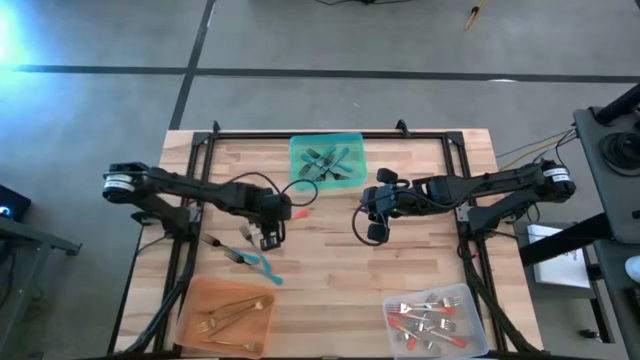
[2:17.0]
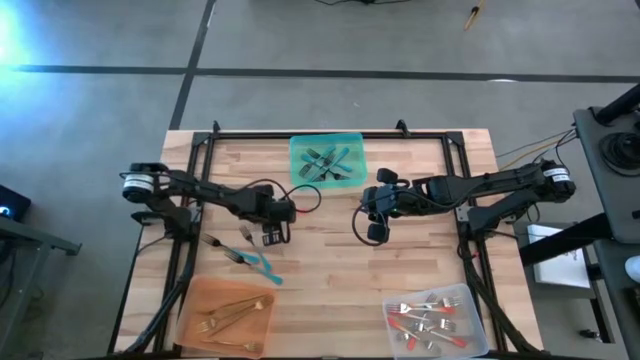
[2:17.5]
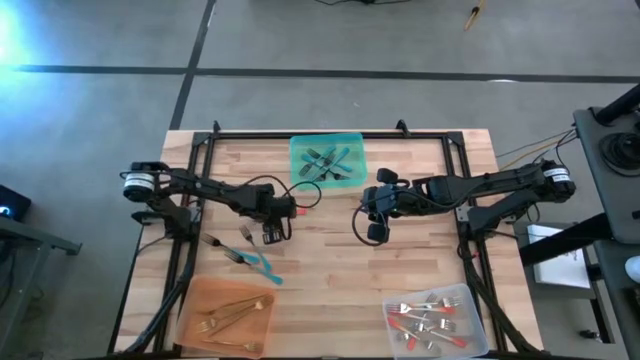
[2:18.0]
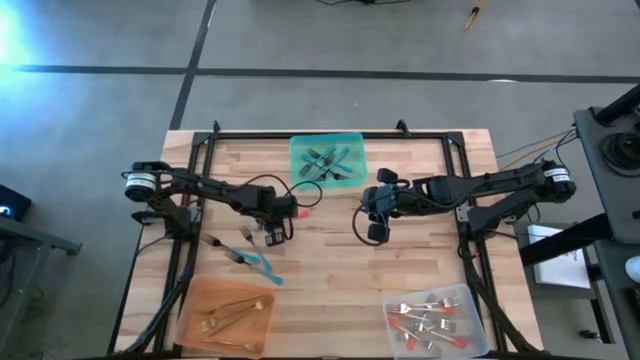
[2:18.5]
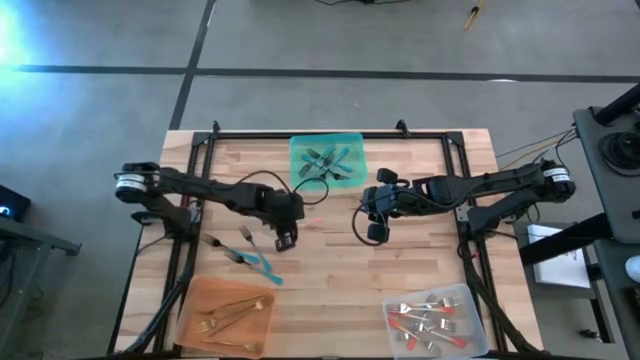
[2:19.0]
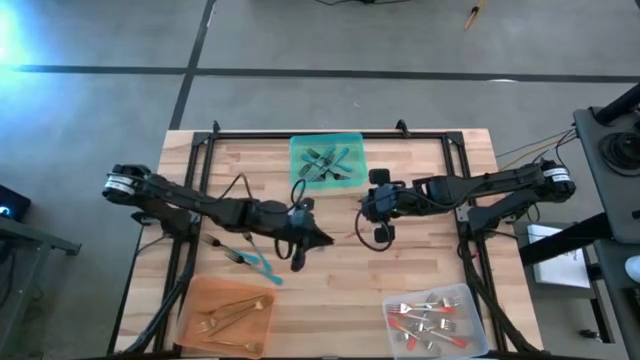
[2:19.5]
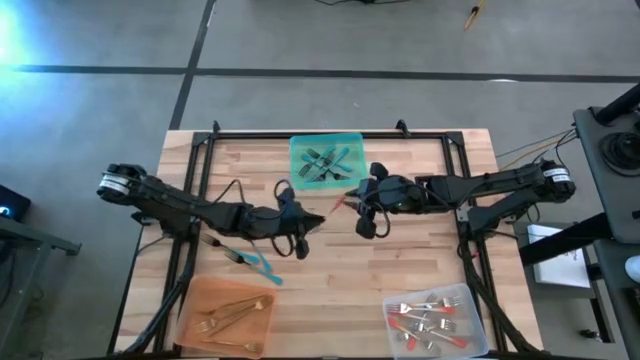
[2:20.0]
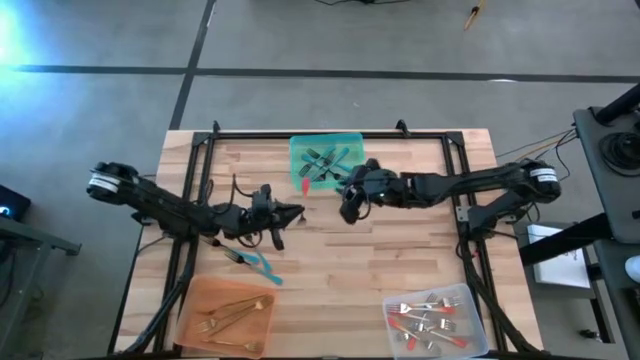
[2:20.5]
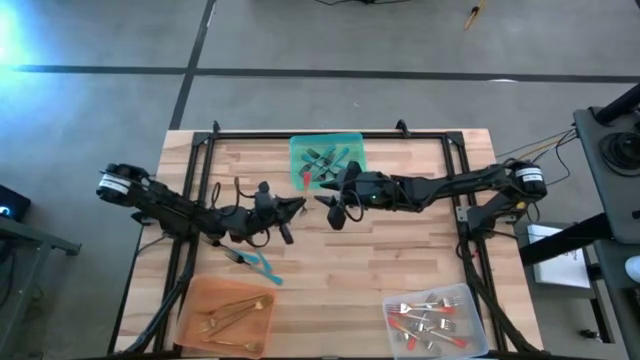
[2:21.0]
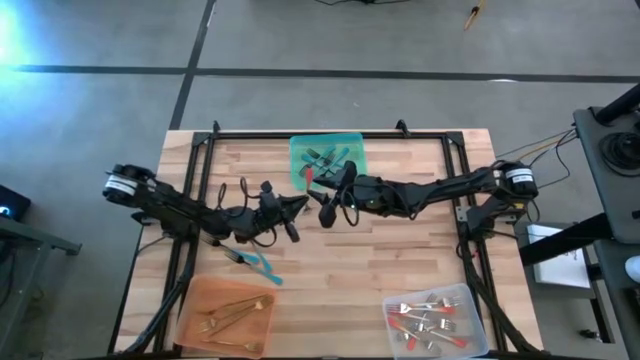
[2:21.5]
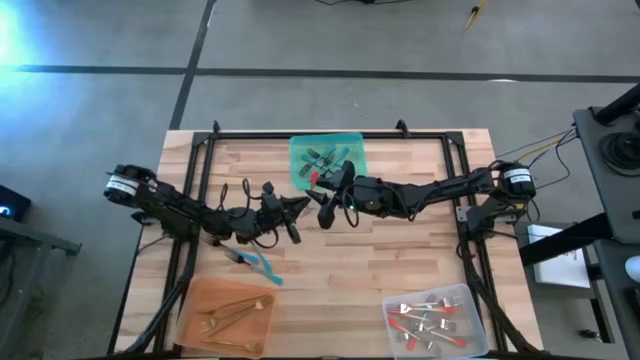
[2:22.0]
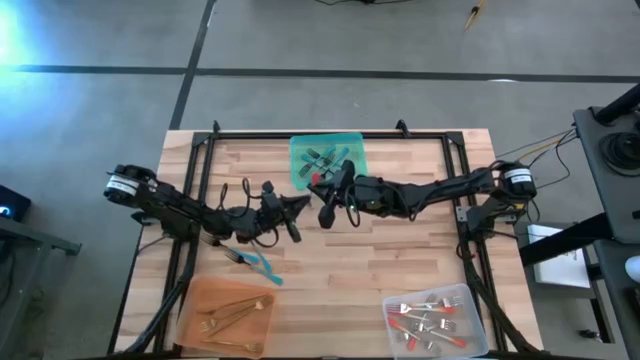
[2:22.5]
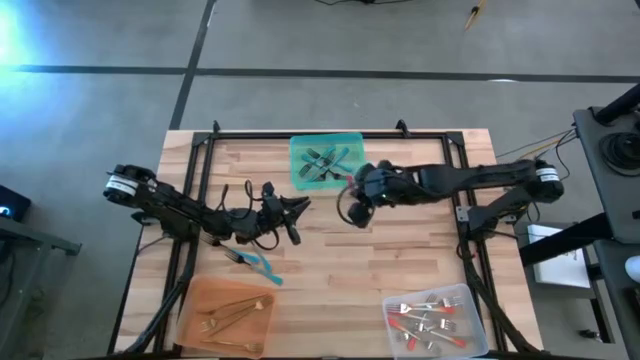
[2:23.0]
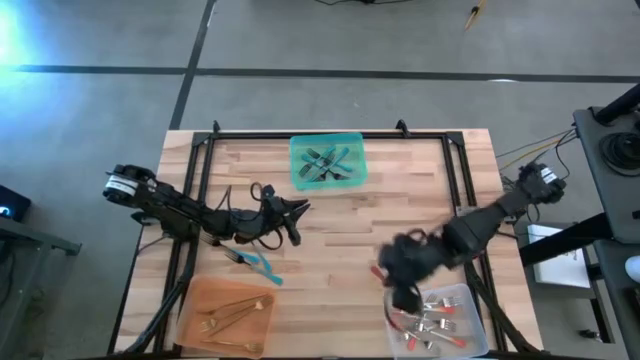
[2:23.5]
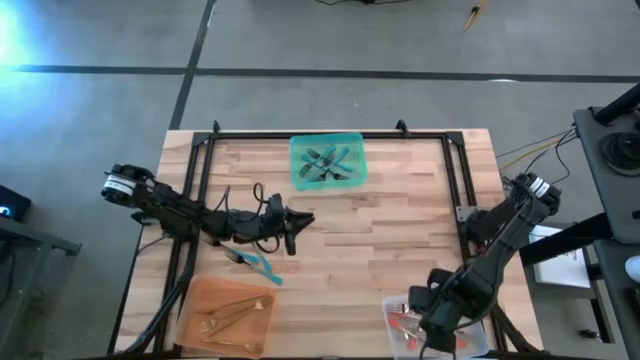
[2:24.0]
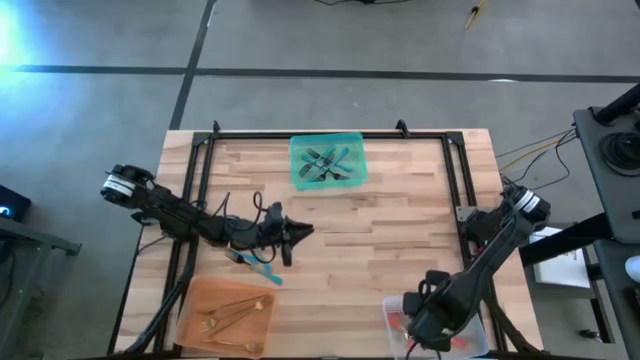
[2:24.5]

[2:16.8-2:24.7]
Task: Sort silverware by color (type)
Put the orange fork into the transparent bin

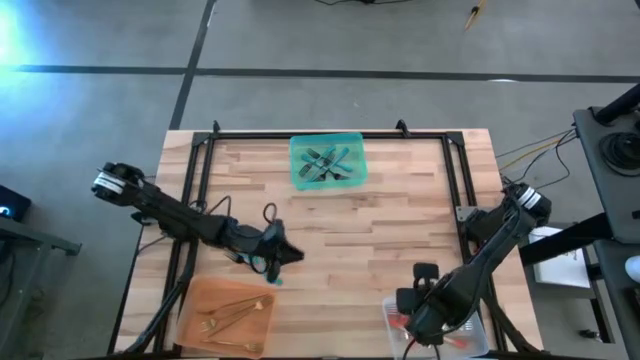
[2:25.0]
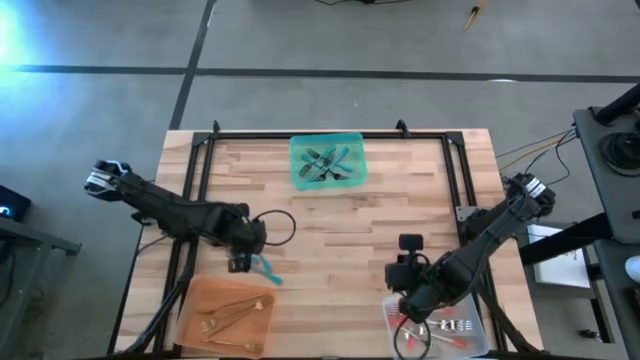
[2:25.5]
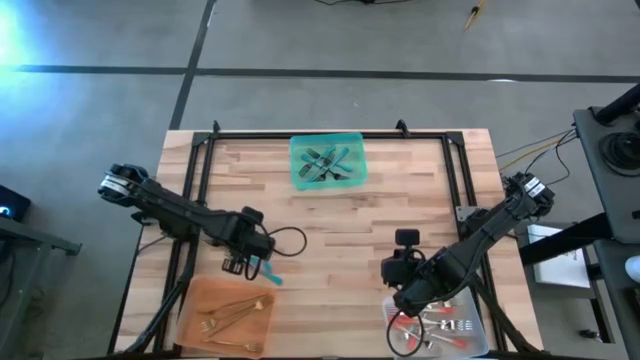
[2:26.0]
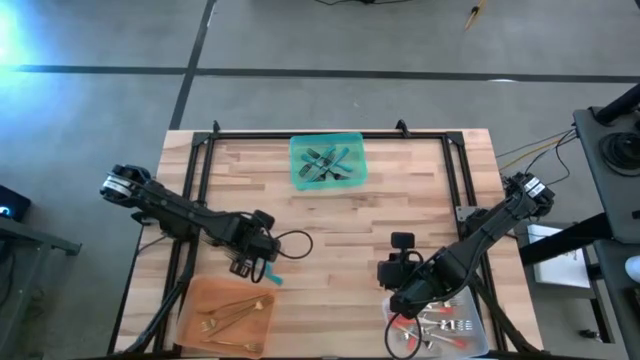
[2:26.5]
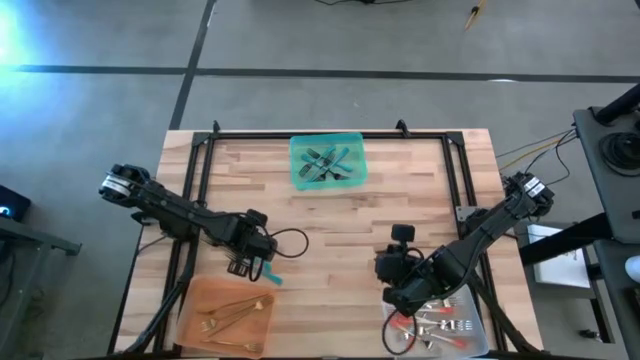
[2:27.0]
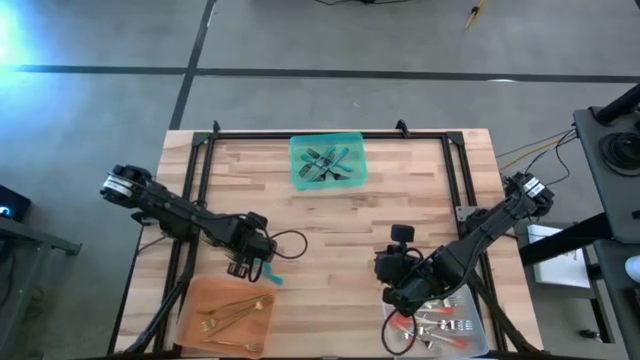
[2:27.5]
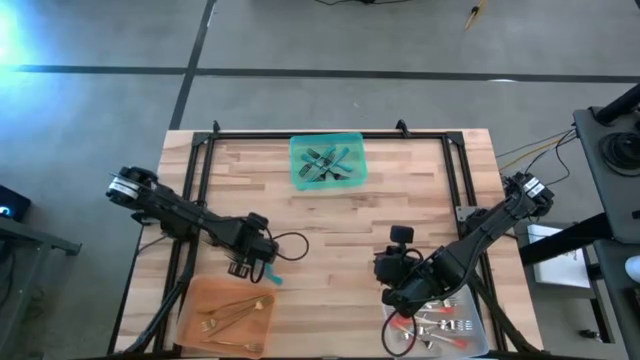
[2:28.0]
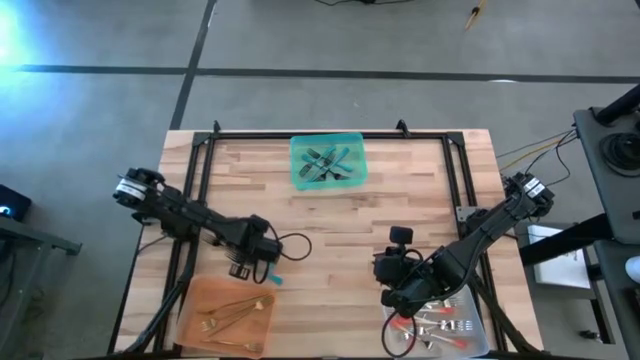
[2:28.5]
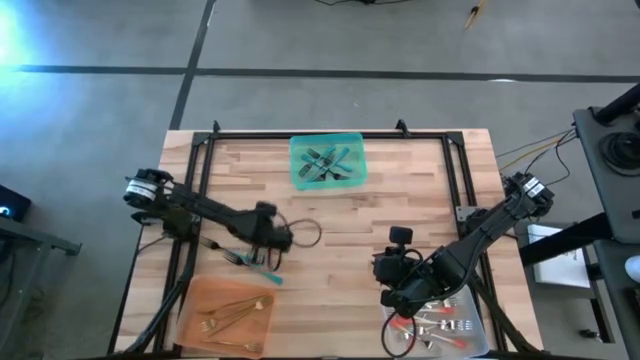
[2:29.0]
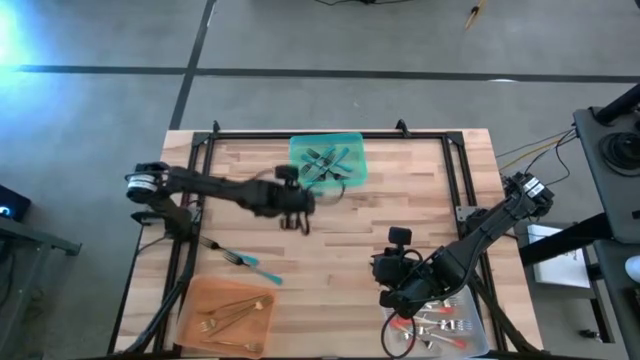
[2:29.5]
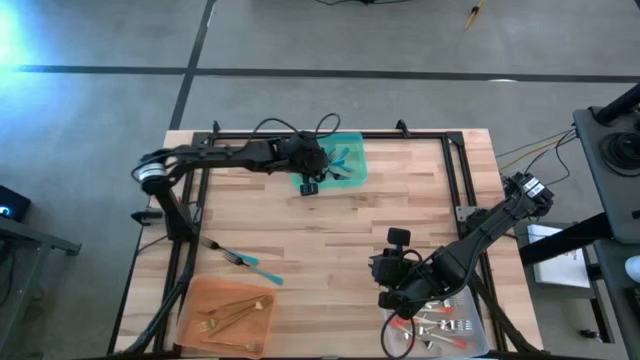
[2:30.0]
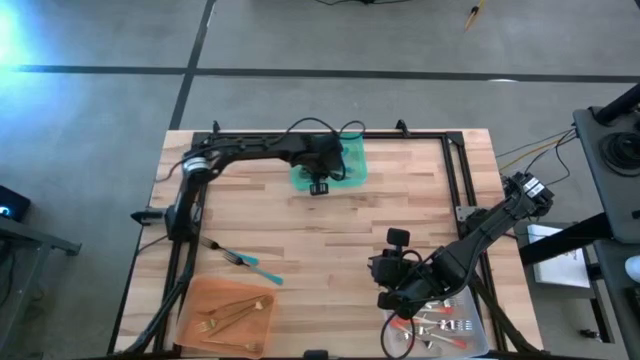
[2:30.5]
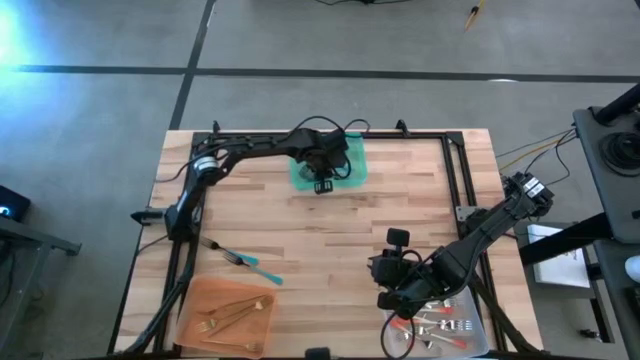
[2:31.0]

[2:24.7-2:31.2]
Put the blue fork into the blue bin

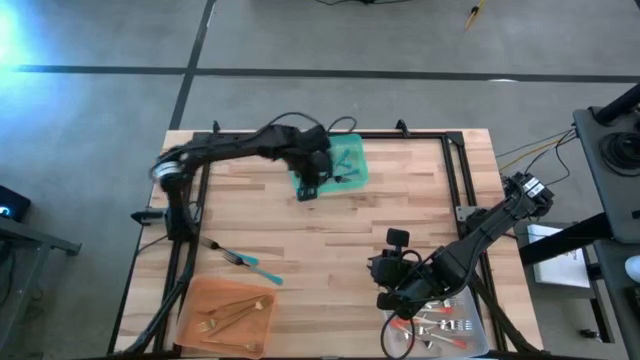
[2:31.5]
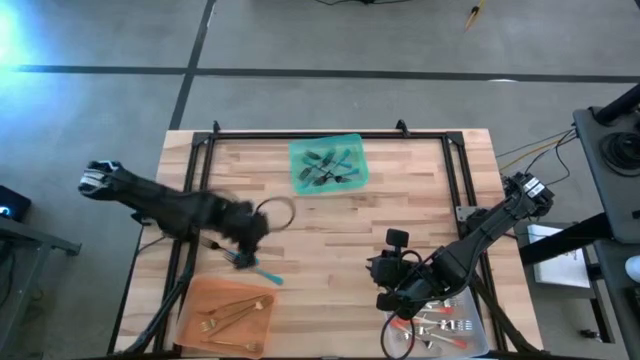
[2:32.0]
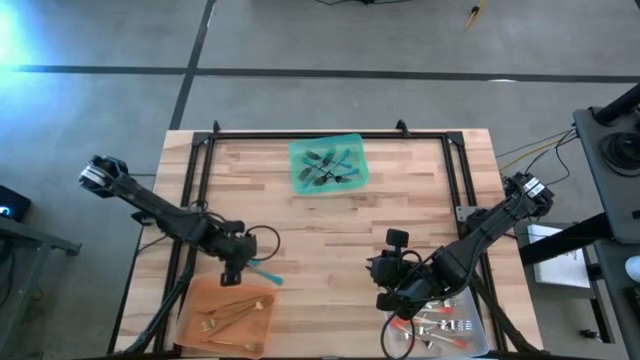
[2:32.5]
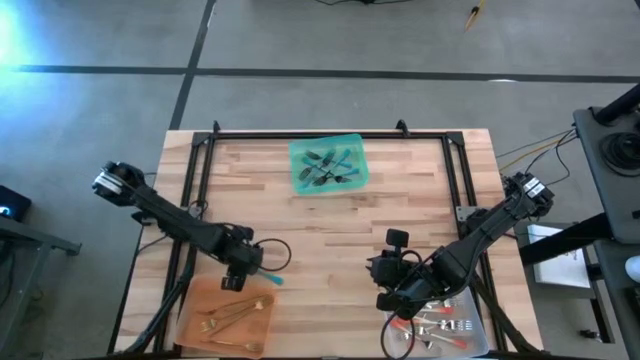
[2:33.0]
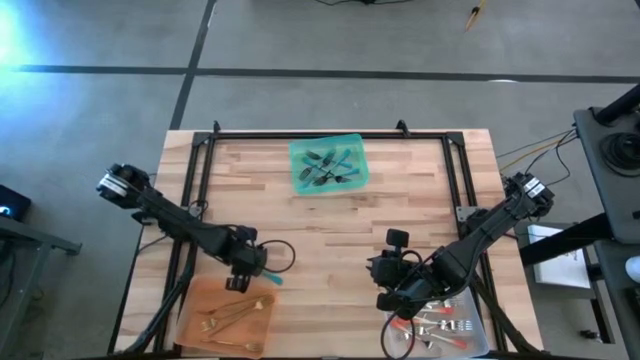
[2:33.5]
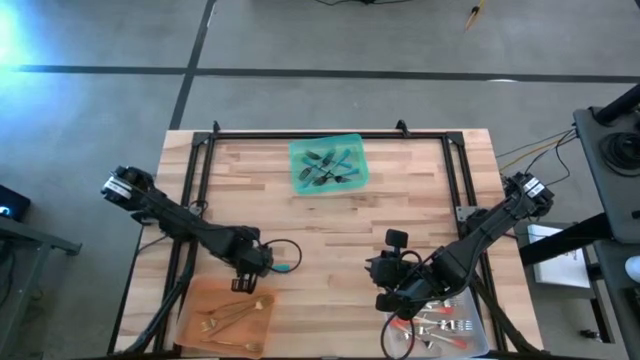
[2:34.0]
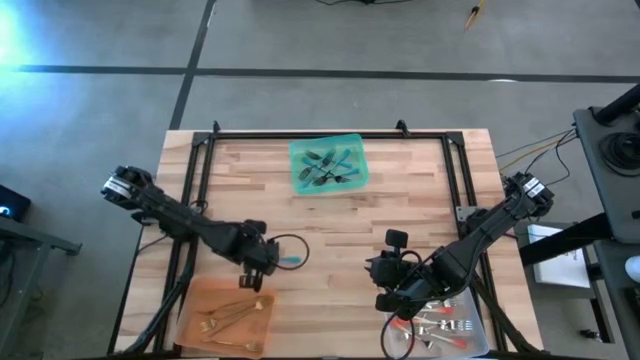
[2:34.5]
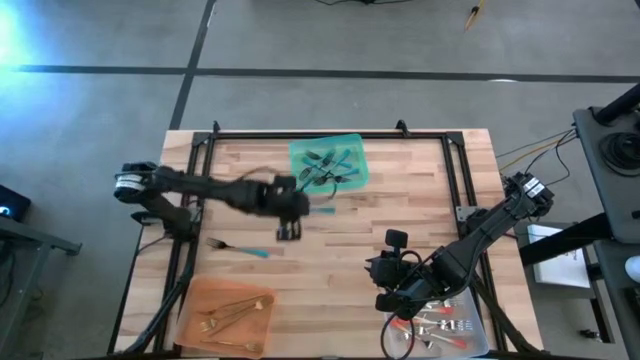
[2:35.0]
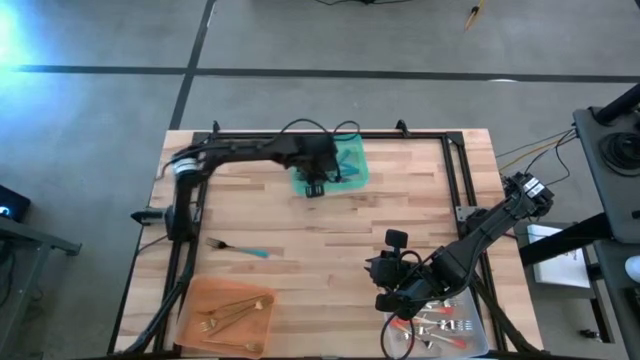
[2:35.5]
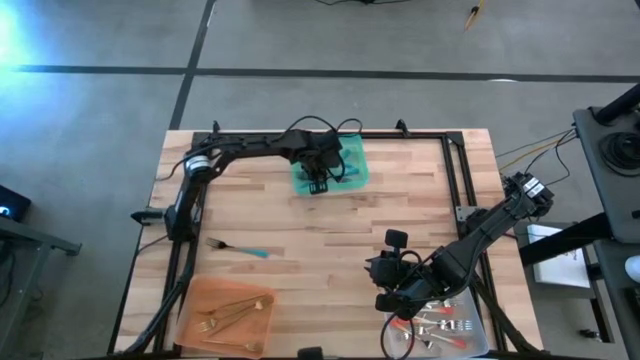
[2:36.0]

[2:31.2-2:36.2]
Put the blue fork into the blue bin

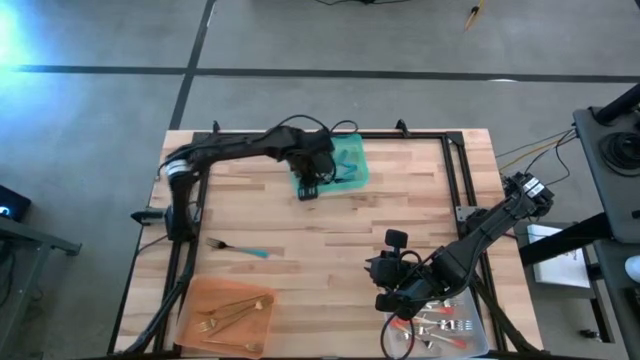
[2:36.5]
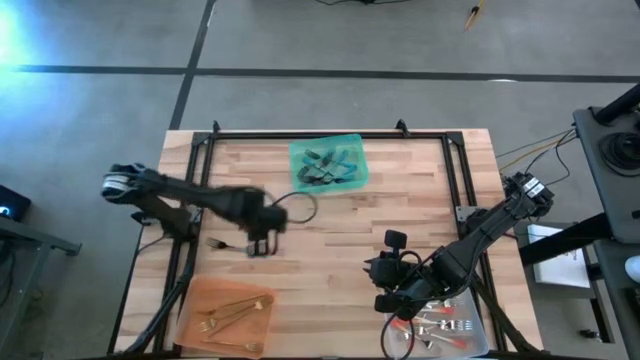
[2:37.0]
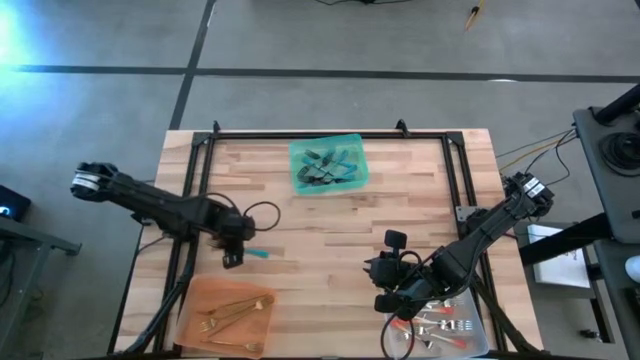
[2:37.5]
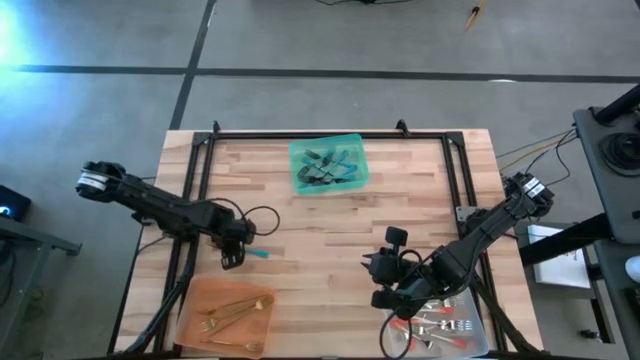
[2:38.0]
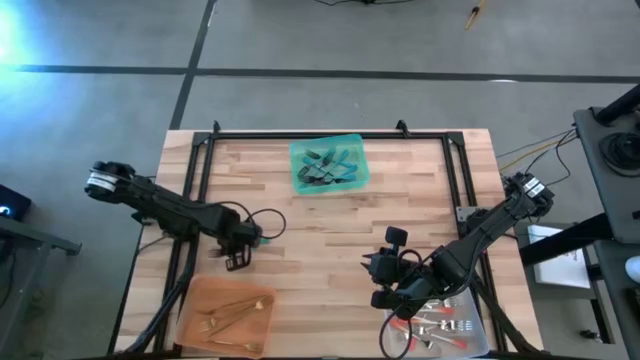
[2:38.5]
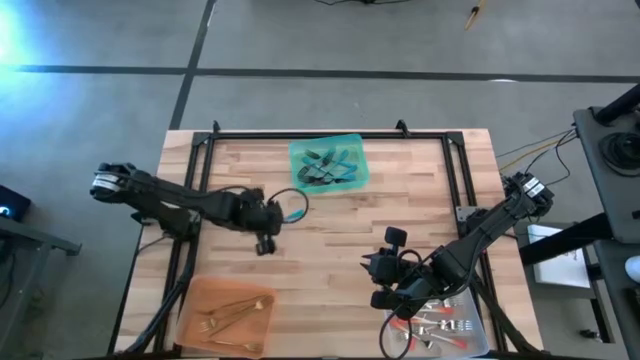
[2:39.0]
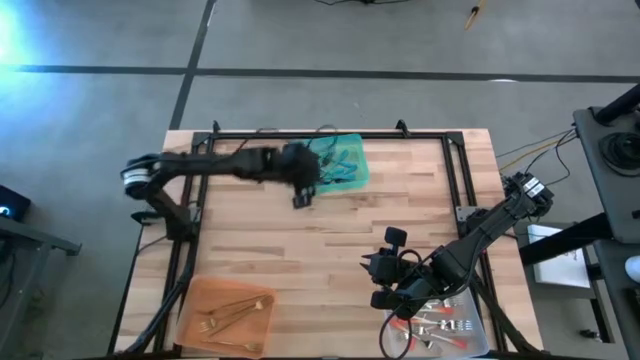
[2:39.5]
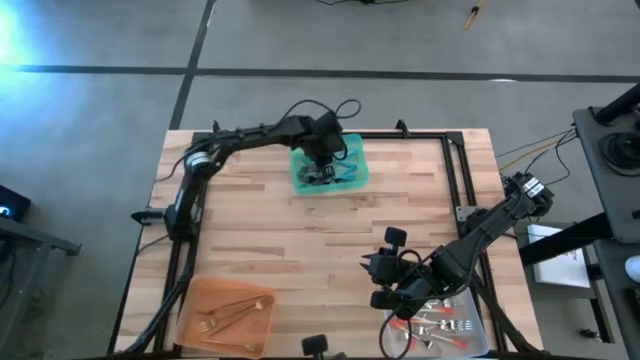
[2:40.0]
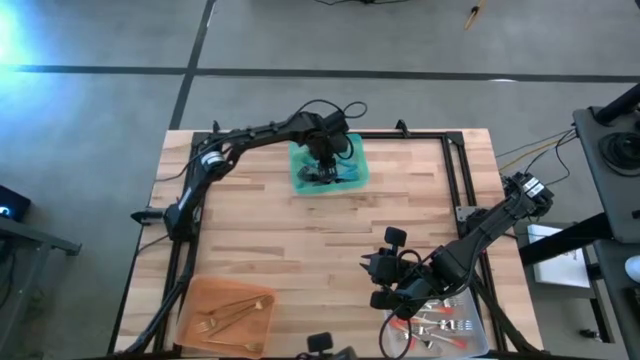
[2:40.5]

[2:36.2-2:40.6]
Put the blue fork into the blue bin
